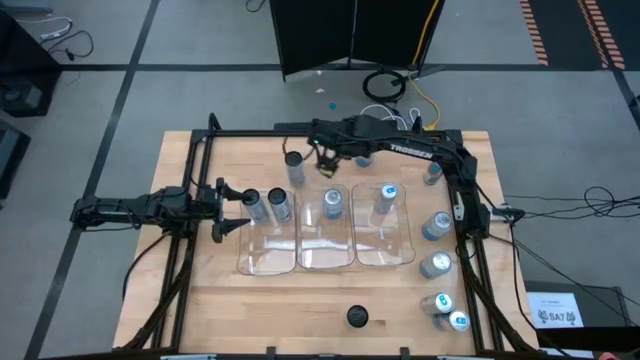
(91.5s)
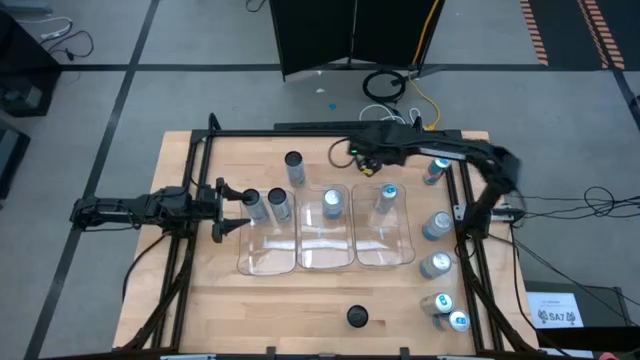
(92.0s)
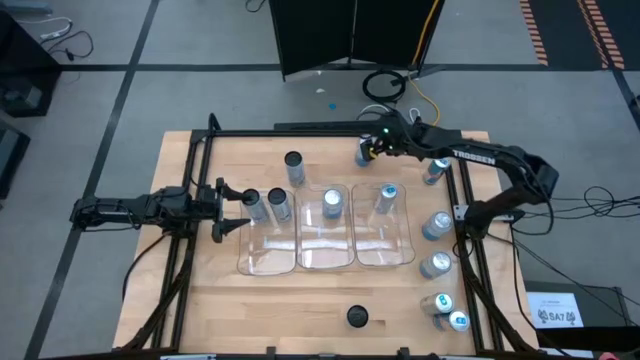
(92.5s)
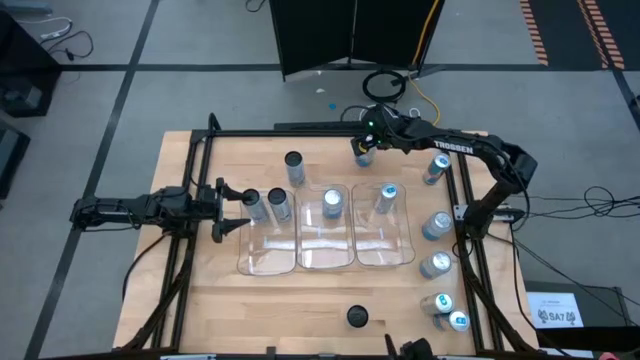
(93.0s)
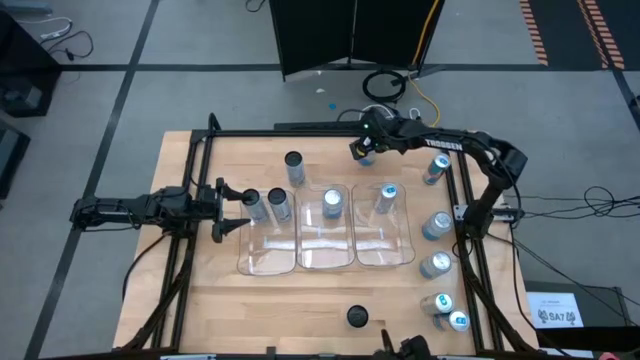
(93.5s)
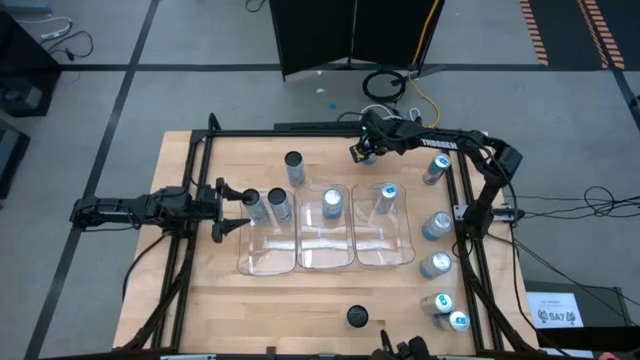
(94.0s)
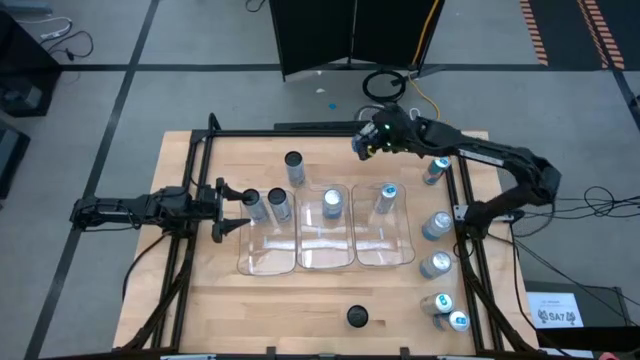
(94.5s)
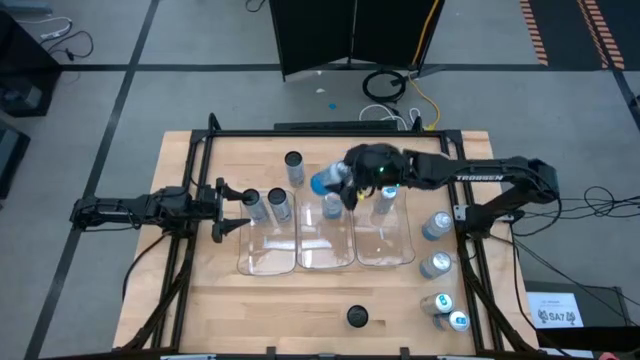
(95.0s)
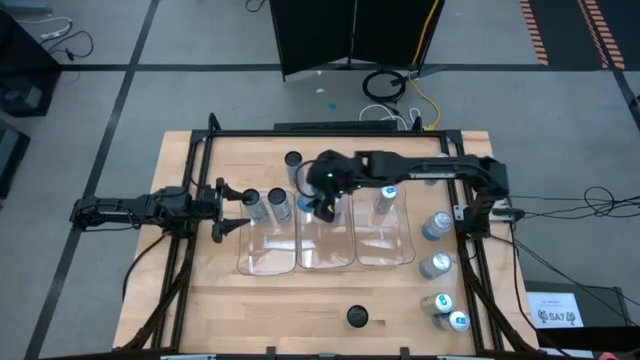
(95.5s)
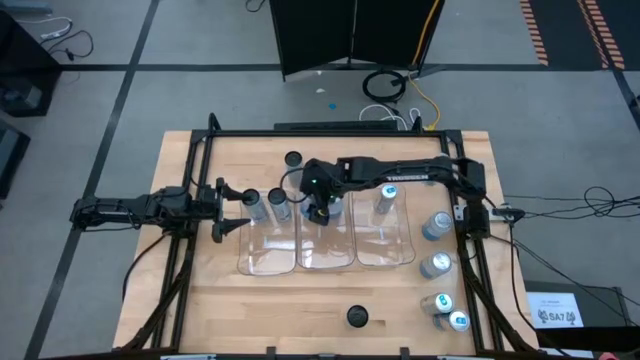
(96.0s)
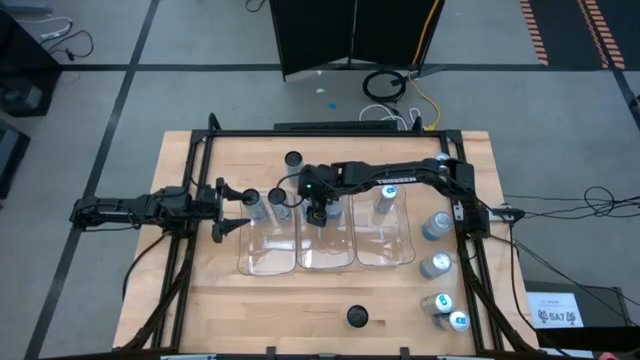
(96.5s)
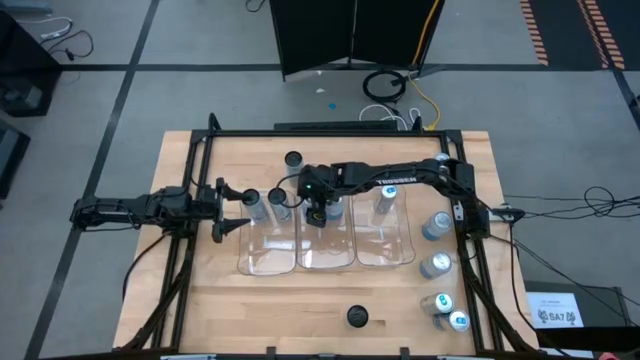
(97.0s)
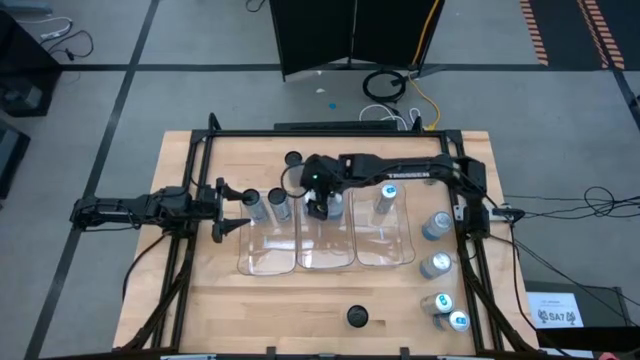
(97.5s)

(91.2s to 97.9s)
Task: Sort soda cans
Put the top blue soda can into the middle transparent bin

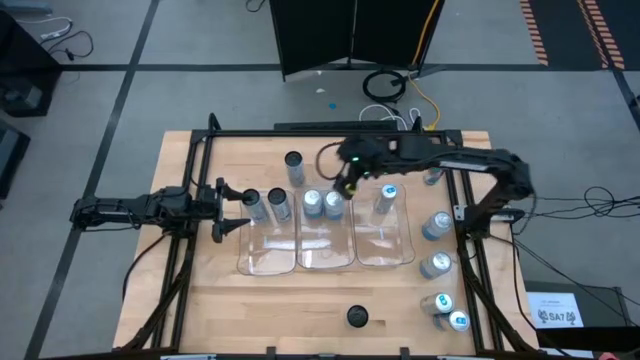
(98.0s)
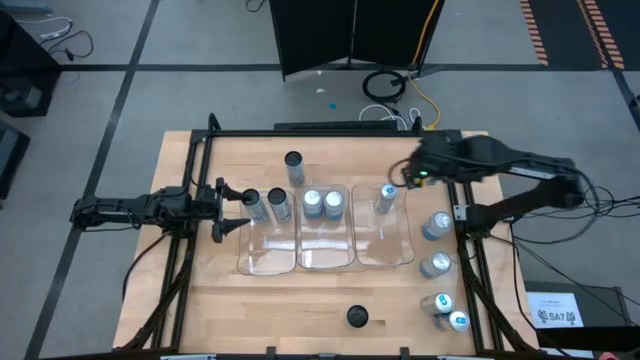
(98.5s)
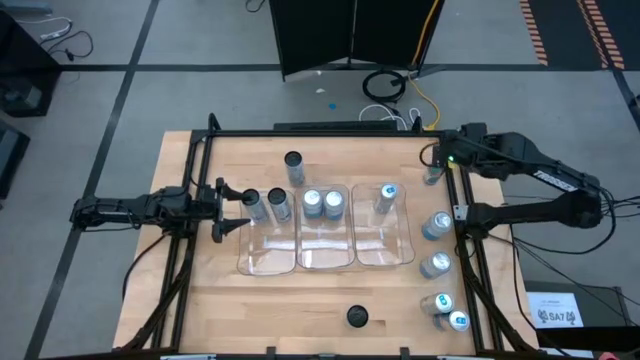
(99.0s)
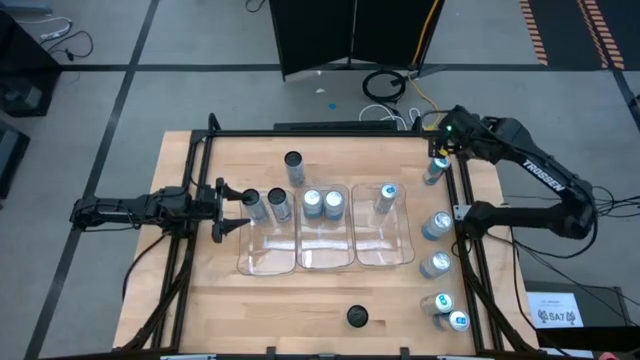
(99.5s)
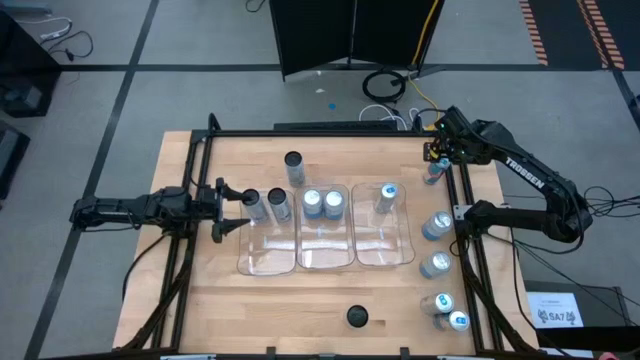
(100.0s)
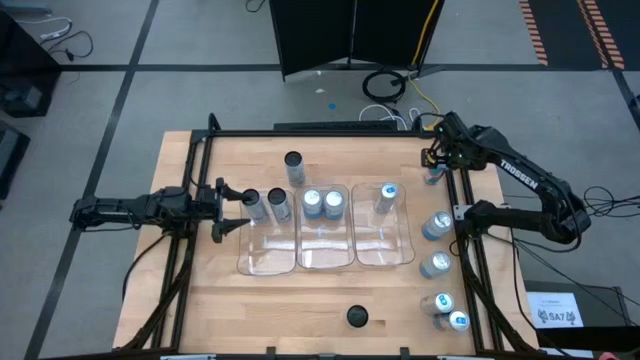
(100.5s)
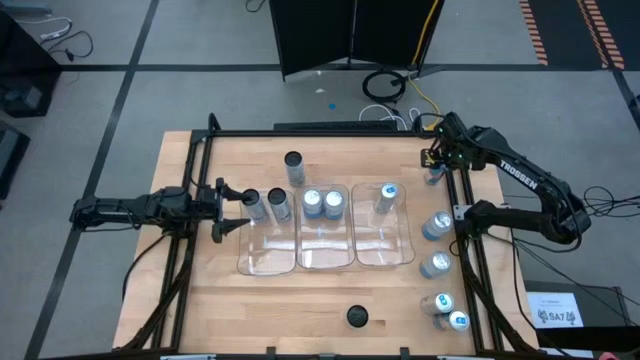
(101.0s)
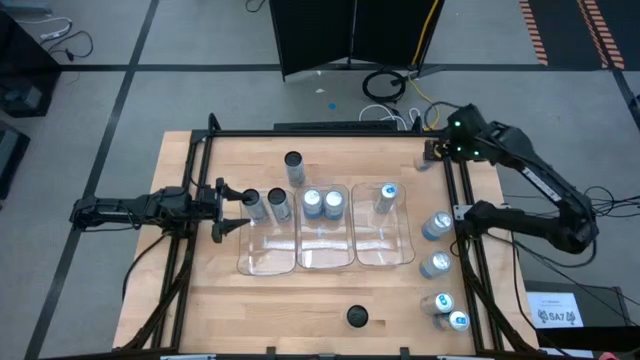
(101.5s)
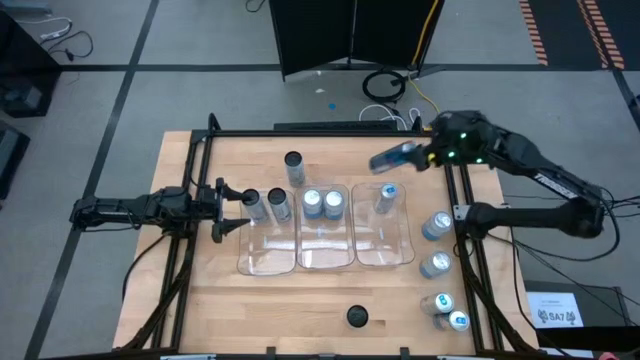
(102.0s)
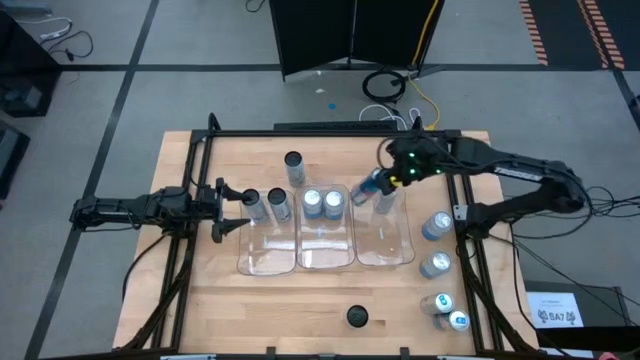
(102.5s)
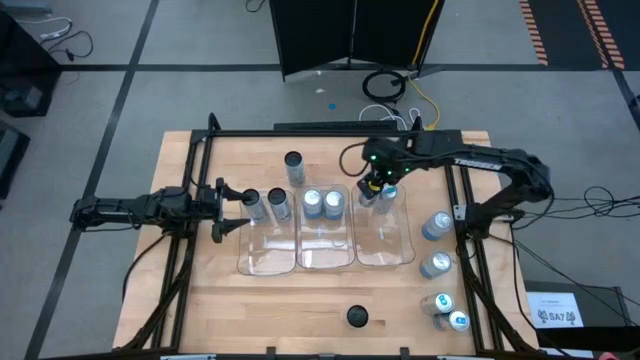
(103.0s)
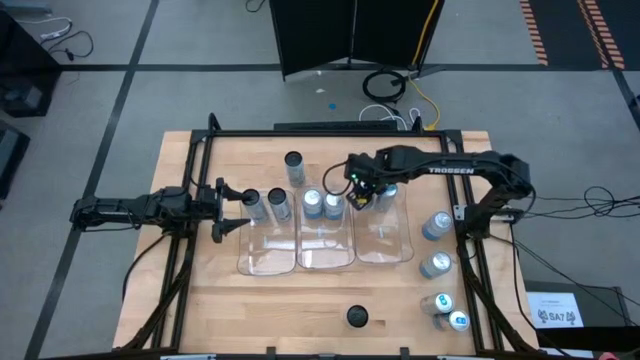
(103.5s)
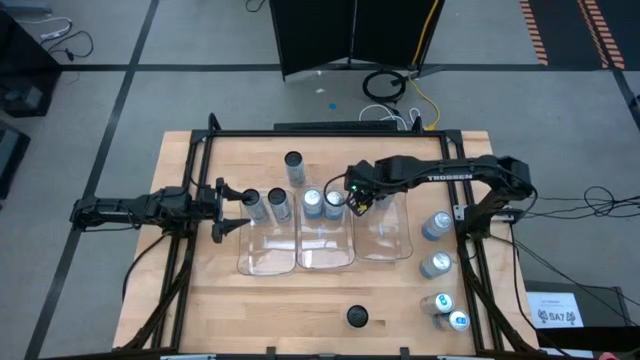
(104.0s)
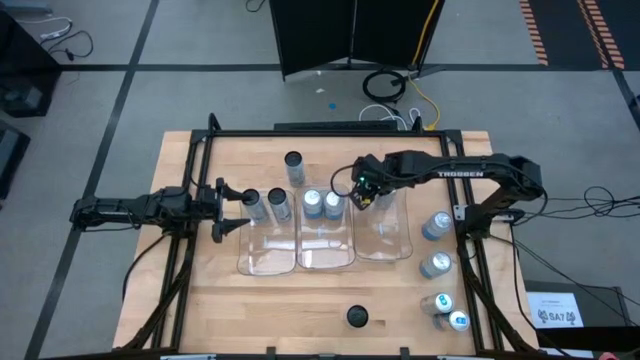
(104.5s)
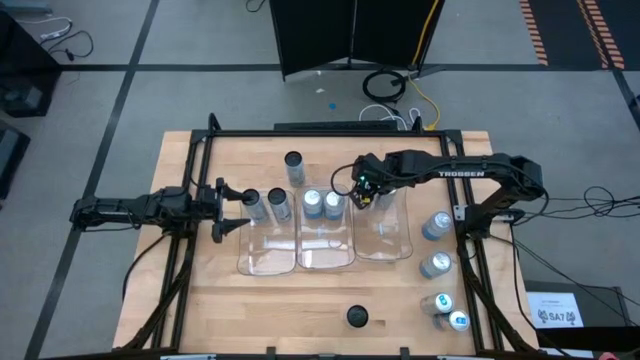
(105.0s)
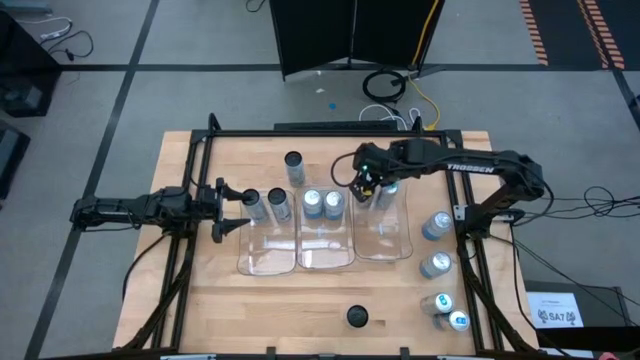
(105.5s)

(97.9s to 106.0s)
Put the top silver soda can into the right transparent bin

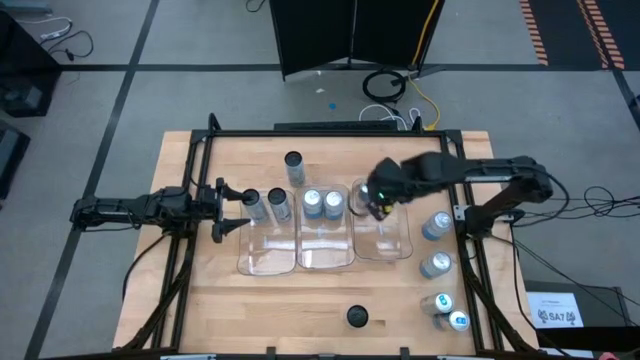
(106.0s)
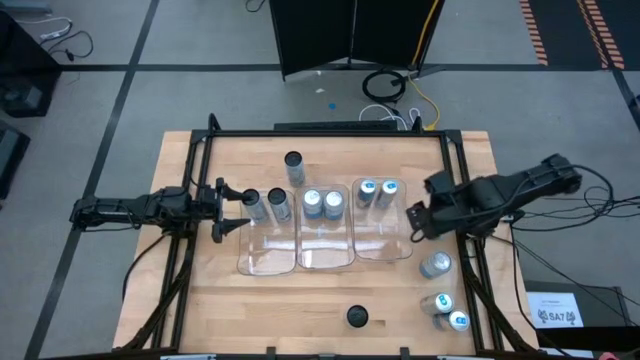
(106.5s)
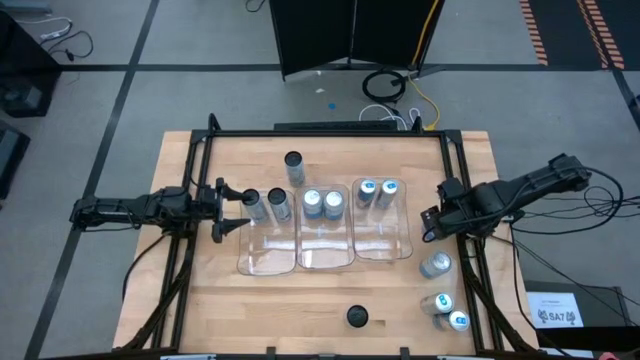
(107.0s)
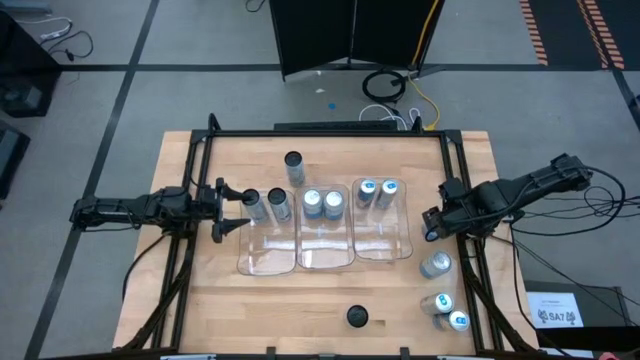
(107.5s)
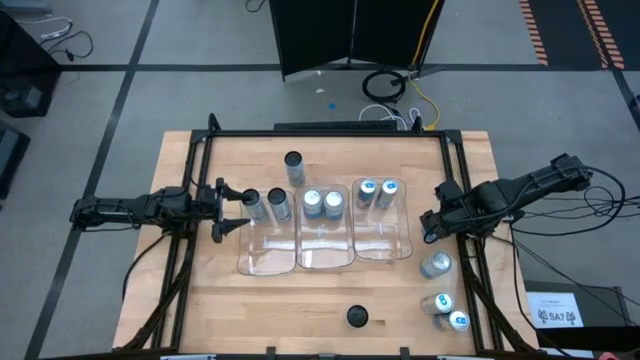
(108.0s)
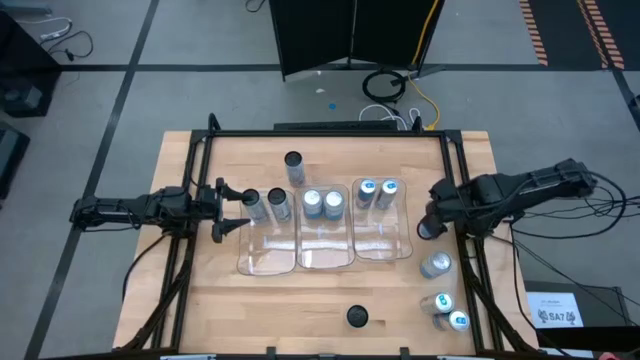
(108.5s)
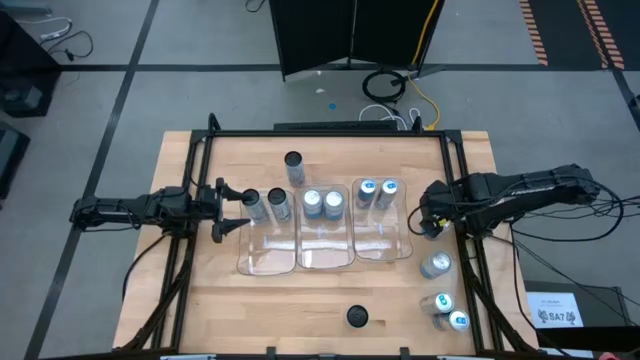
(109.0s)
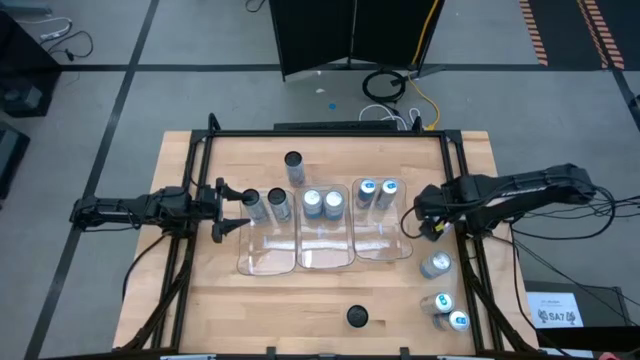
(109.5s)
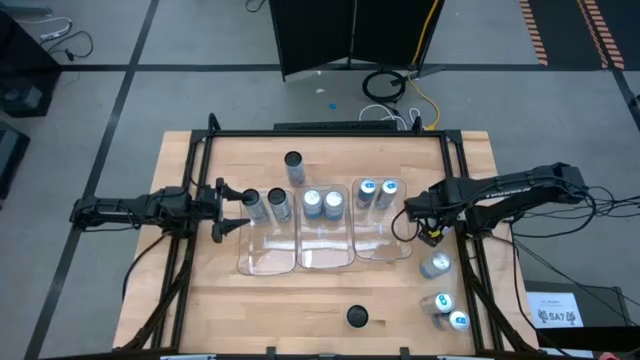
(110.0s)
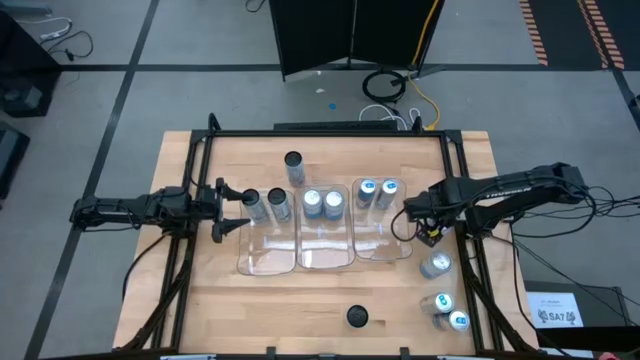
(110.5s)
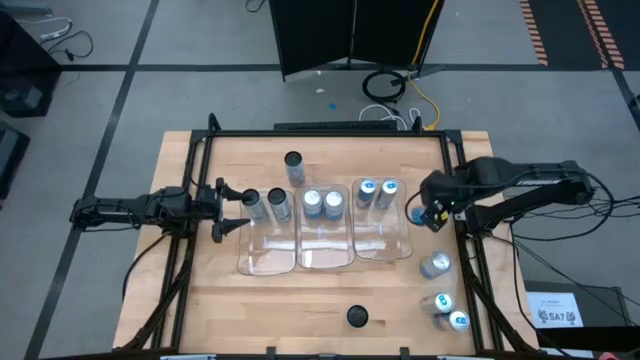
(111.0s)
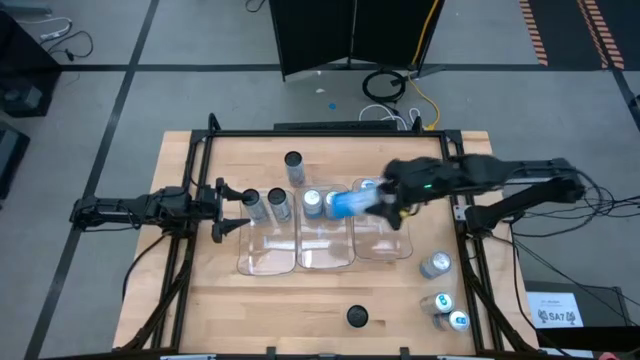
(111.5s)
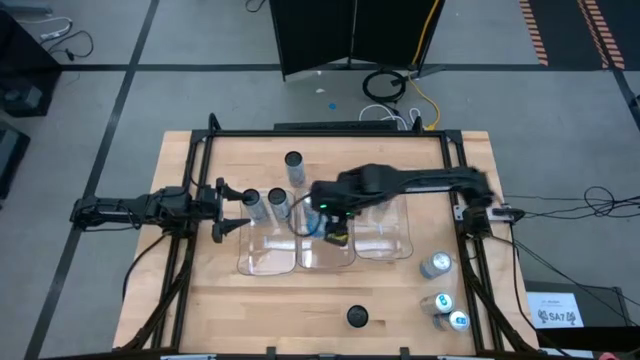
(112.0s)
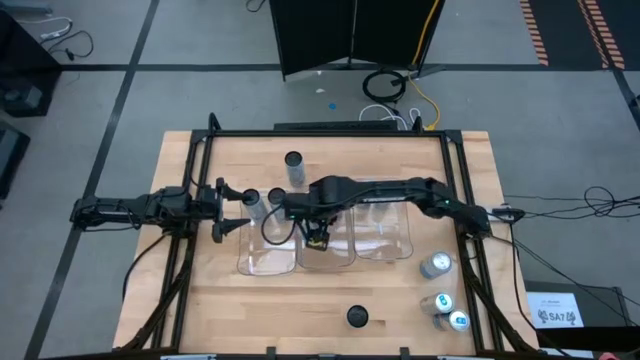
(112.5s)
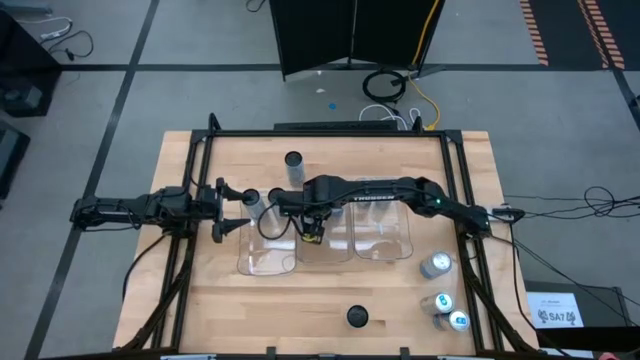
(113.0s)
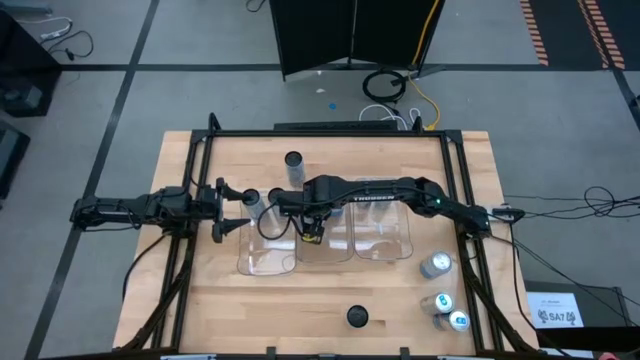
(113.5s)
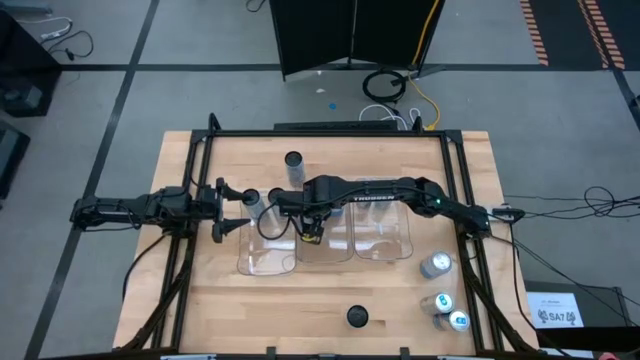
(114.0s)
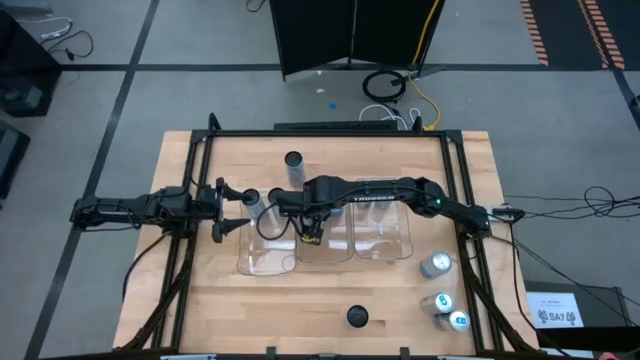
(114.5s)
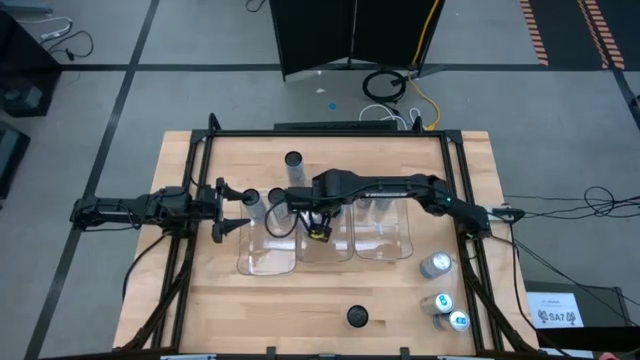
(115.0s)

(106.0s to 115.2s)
Put the top blue soda can into the middle transparent bin
